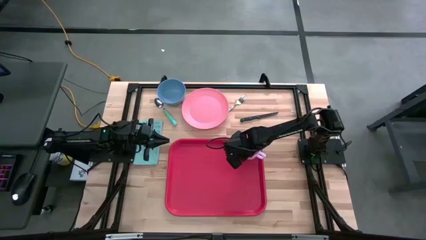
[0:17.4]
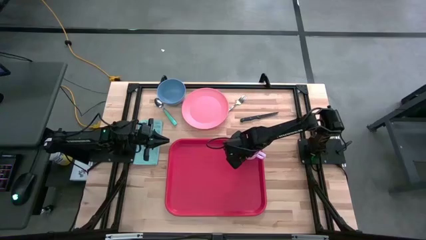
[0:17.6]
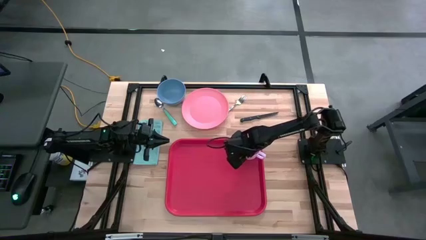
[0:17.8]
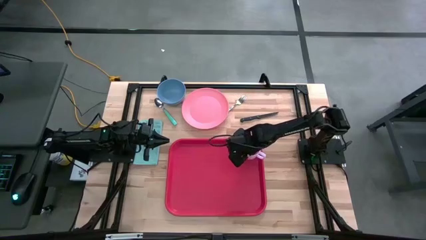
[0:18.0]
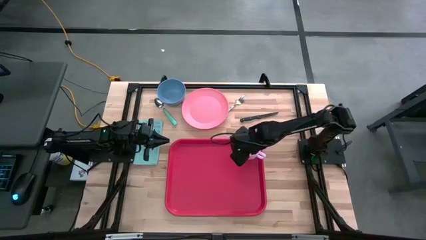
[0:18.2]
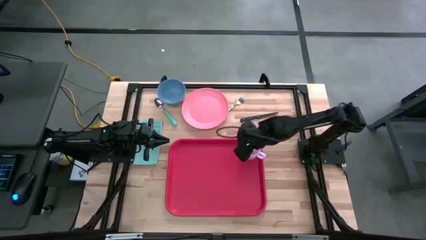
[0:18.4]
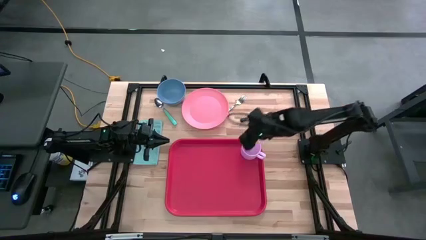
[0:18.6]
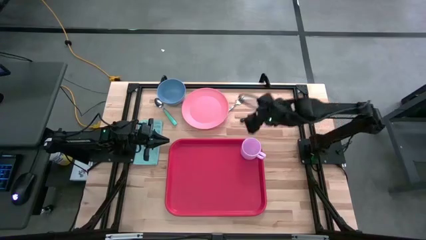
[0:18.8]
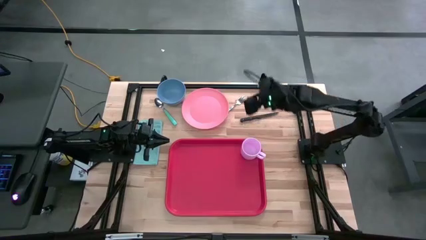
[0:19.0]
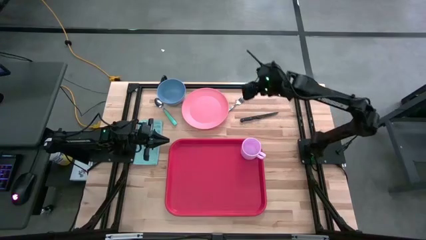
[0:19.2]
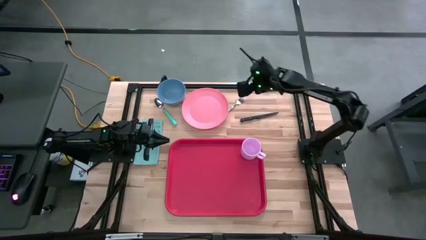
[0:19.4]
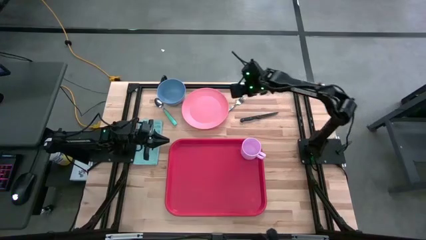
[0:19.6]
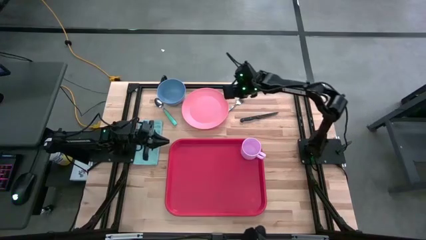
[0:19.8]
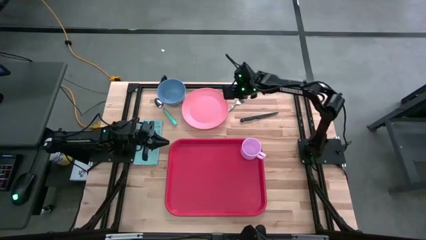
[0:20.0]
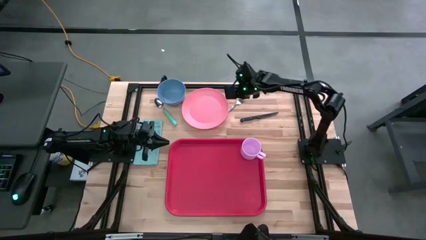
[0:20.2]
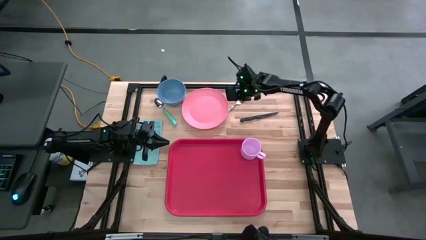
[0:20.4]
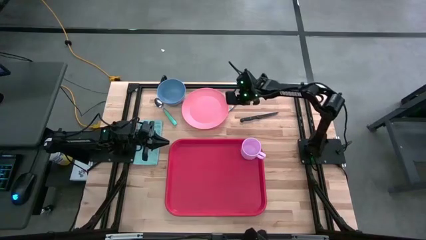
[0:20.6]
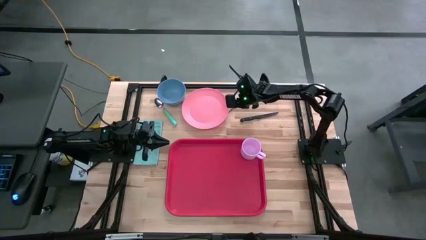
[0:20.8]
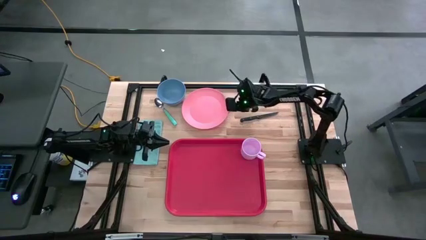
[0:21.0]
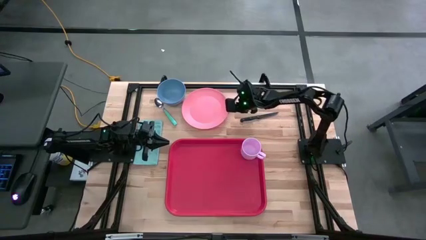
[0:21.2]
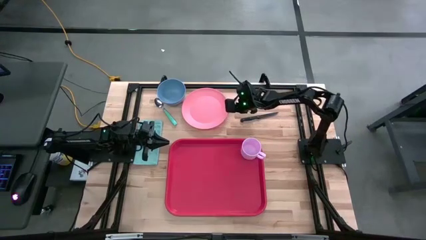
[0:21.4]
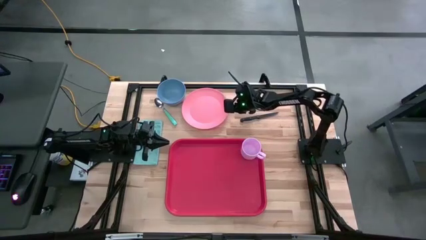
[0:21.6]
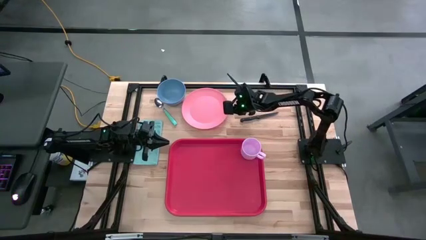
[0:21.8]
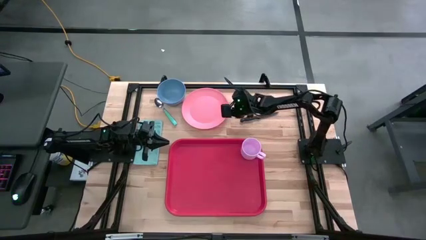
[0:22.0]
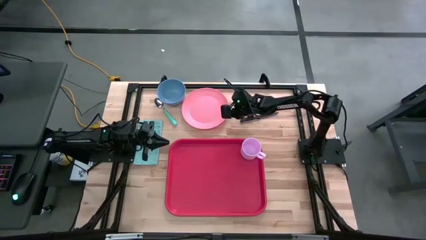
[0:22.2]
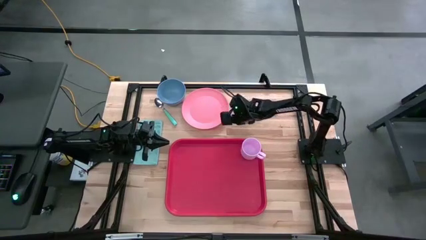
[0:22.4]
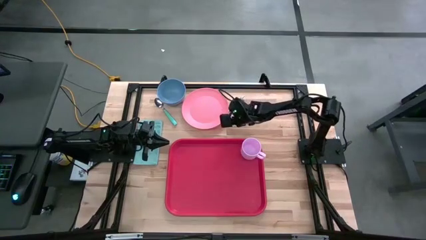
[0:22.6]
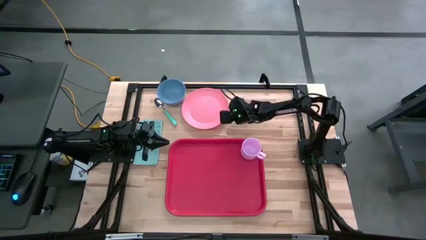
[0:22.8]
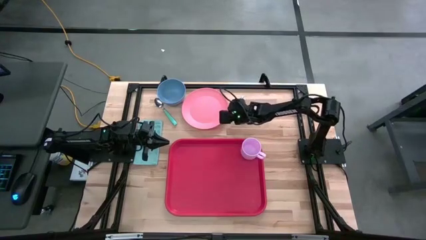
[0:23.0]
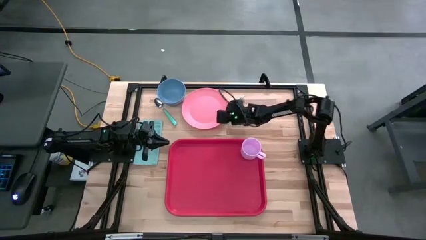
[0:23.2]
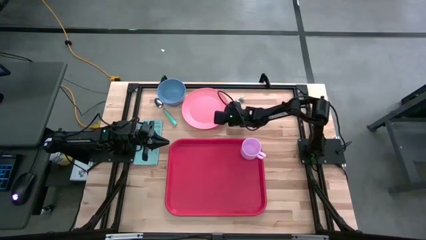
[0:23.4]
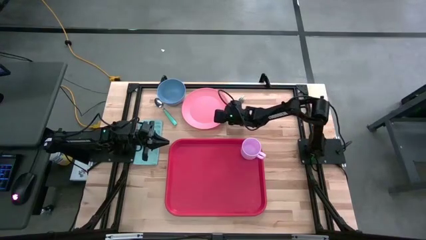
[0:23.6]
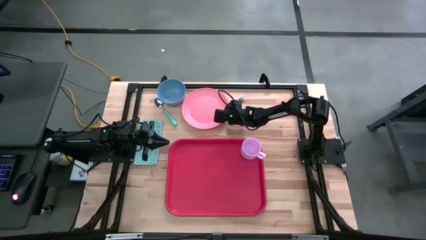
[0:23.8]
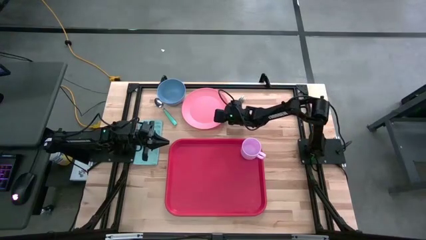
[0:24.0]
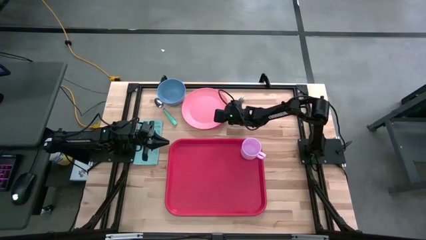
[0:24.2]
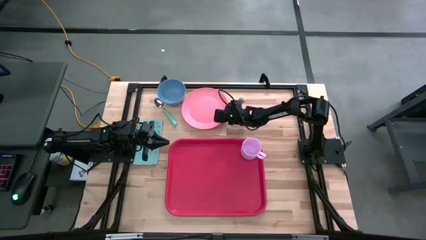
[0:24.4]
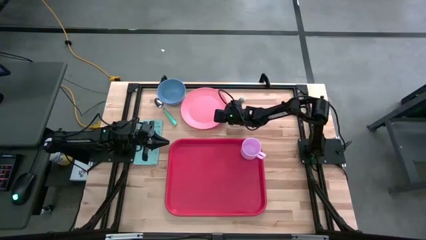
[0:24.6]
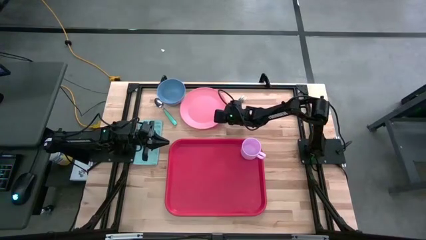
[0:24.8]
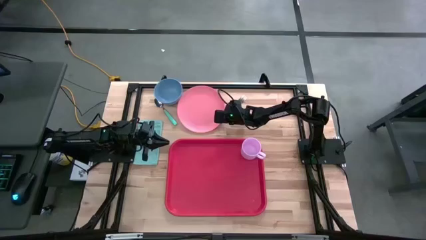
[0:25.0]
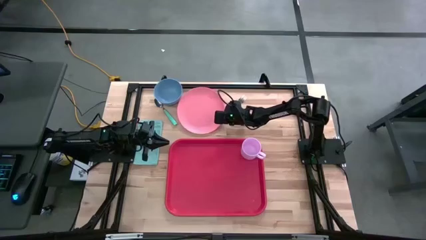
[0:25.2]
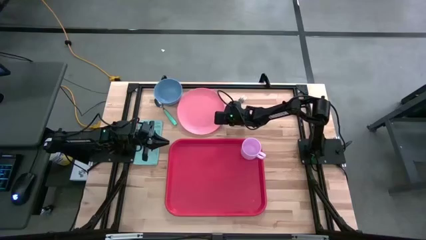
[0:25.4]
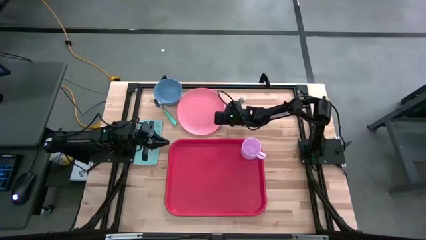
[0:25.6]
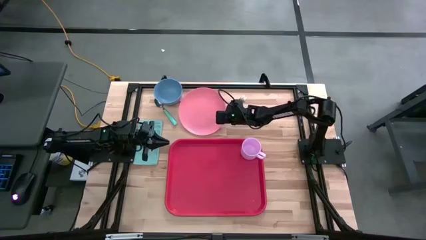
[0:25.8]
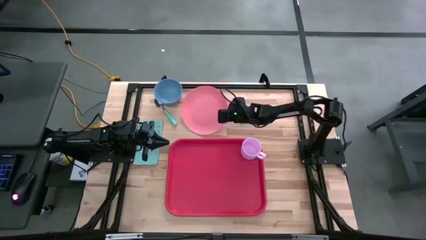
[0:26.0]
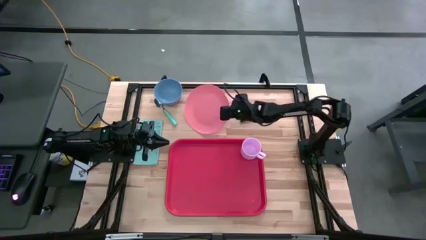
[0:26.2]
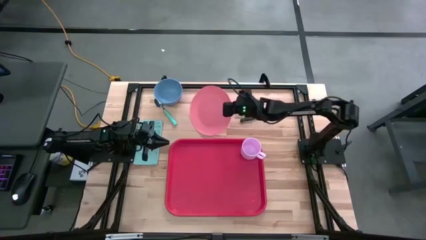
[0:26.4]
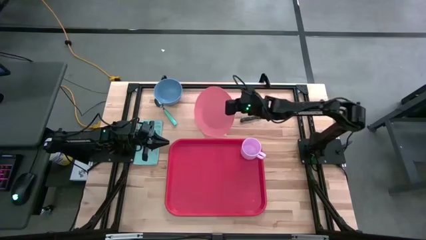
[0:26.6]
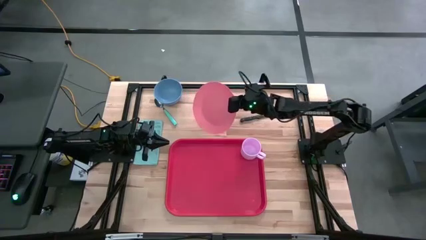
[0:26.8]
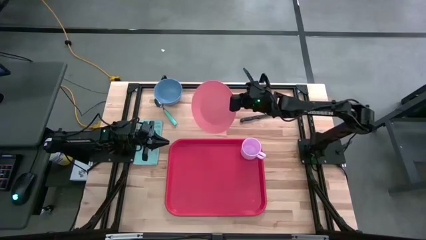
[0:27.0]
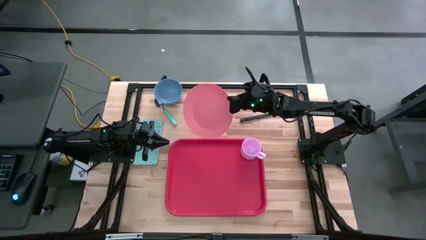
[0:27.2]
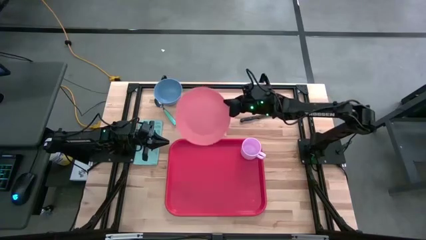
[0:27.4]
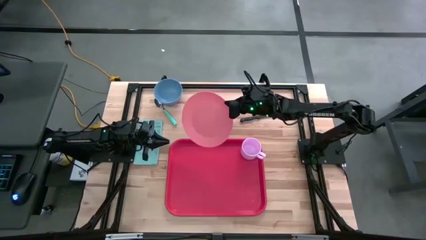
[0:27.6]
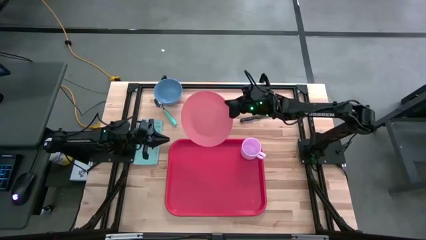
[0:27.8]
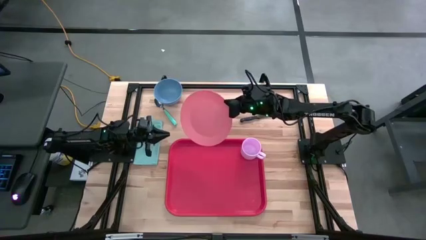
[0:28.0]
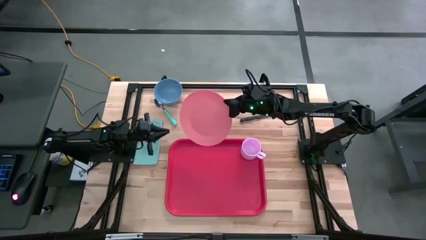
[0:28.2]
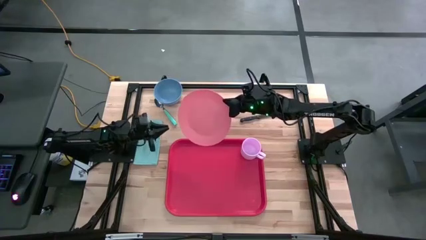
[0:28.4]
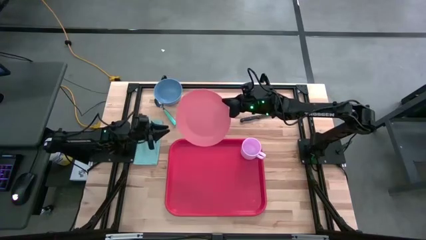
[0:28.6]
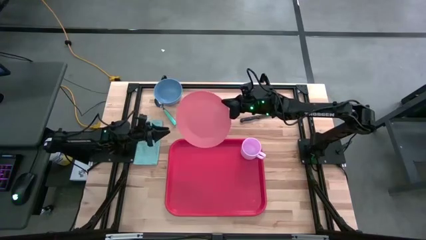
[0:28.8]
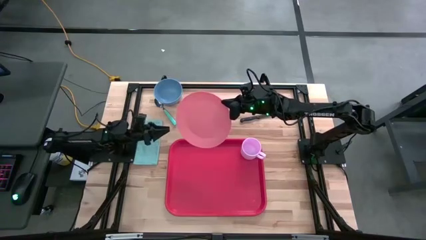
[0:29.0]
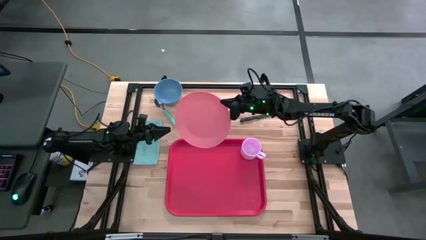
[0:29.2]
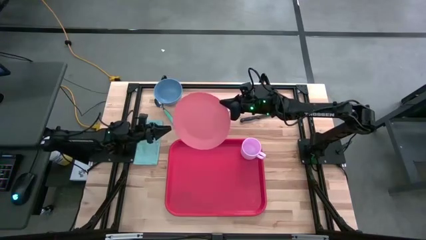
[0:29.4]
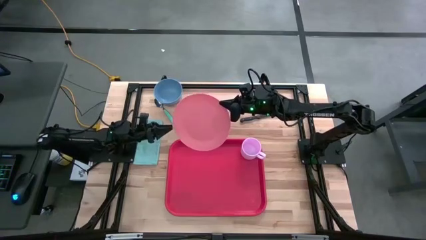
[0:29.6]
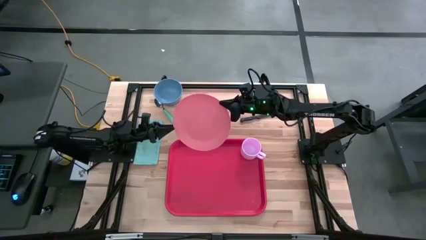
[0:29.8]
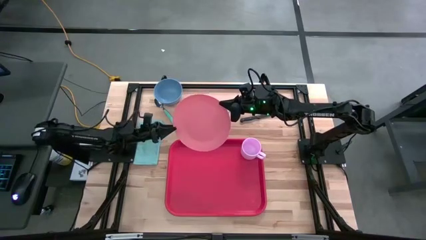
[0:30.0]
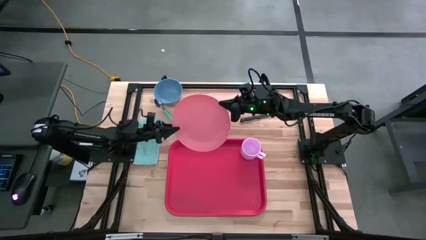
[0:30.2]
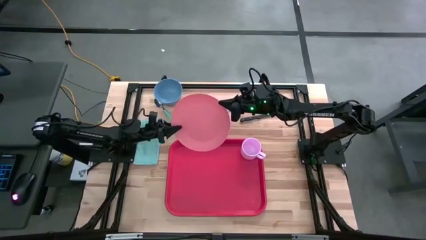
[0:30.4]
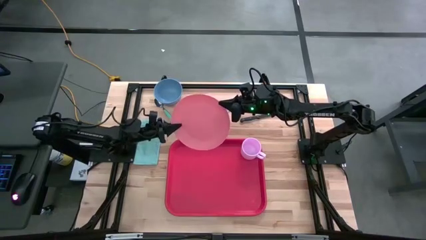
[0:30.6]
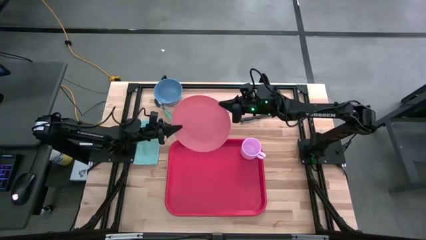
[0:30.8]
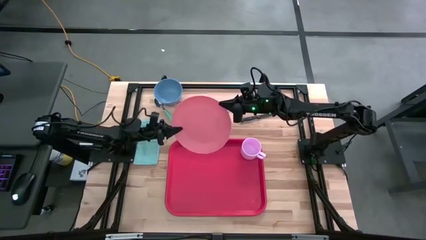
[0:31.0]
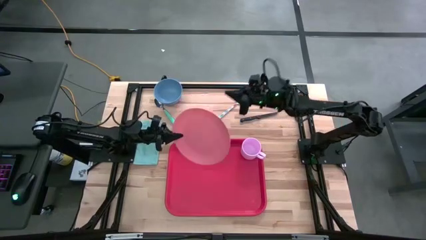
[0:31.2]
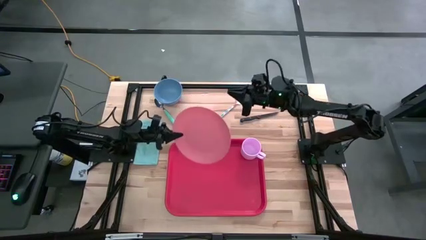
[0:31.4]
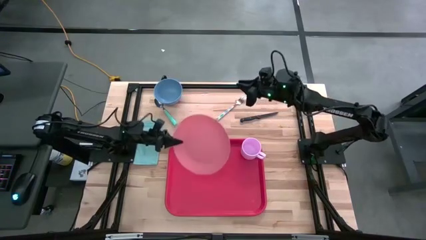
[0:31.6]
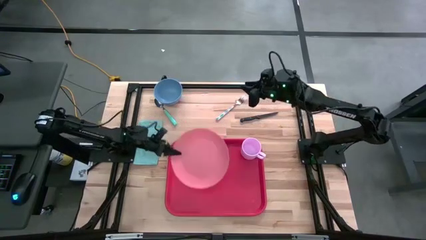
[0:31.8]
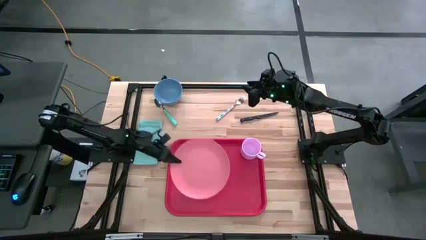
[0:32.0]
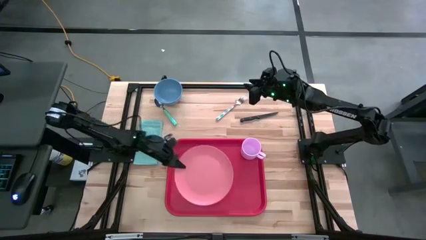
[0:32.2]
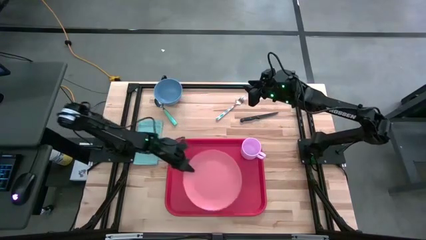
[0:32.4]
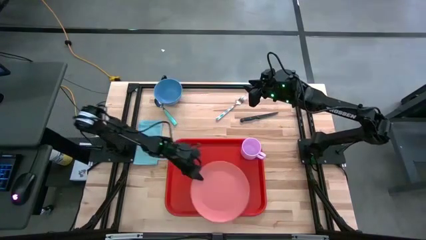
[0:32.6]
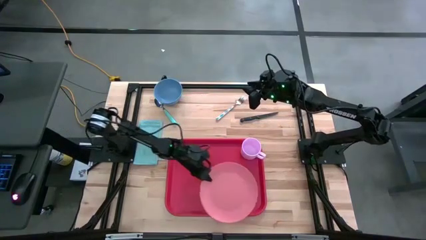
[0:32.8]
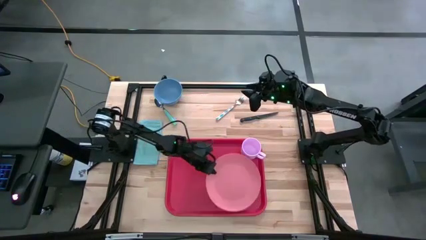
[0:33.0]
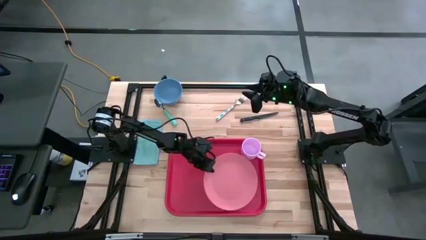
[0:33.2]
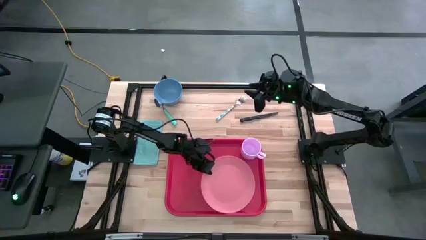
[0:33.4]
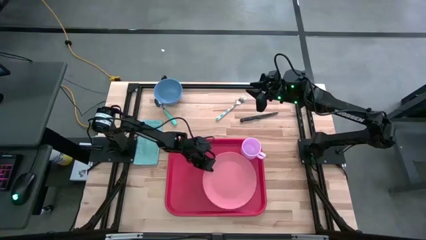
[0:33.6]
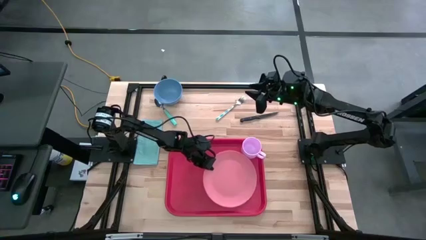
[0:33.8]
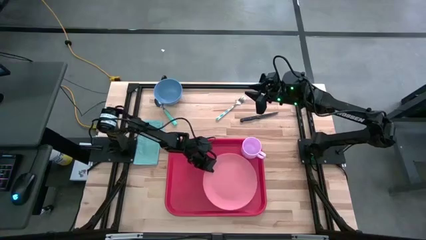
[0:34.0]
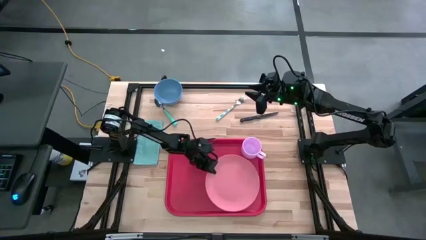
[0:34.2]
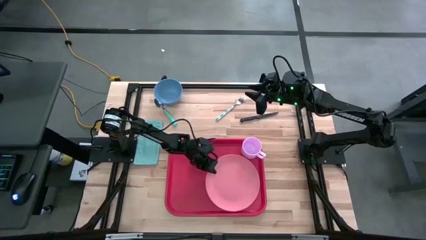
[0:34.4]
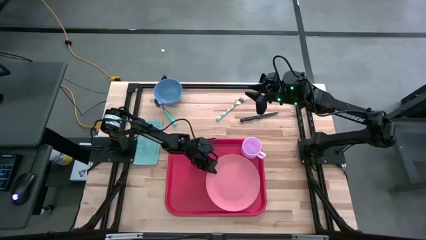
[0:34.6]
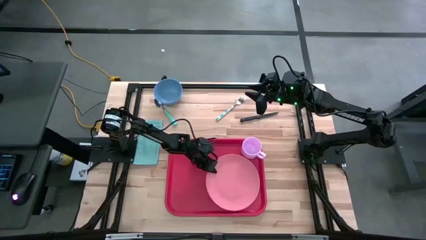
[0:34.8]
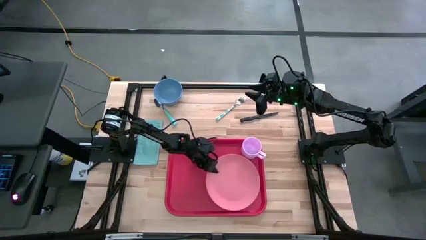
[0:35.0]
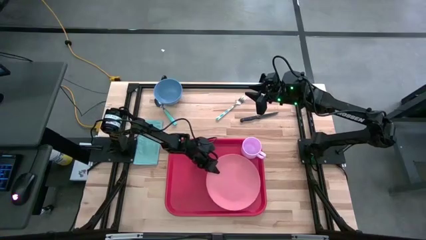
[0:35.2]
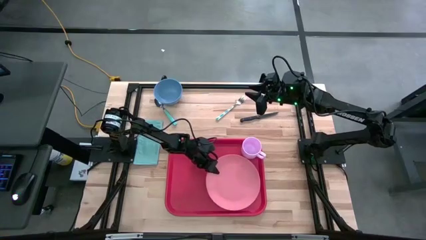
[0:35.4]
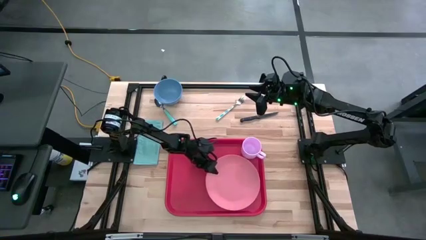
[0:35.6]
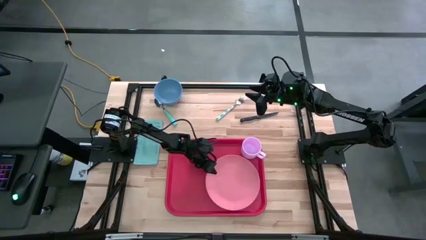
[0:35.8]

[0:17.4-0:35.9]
Task: Set up tray
Put the pink plate on the red serving tray to the bottom left of the purple mug
